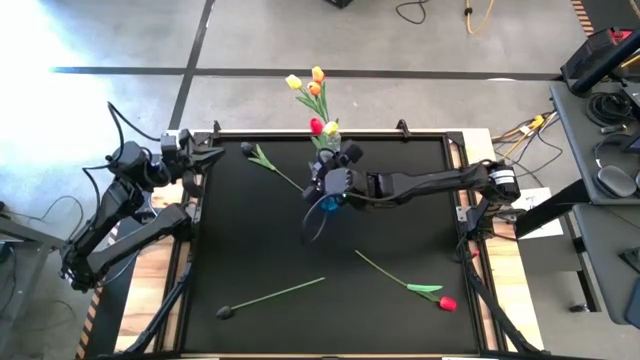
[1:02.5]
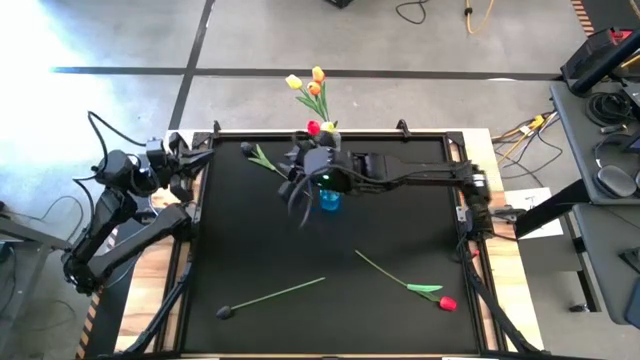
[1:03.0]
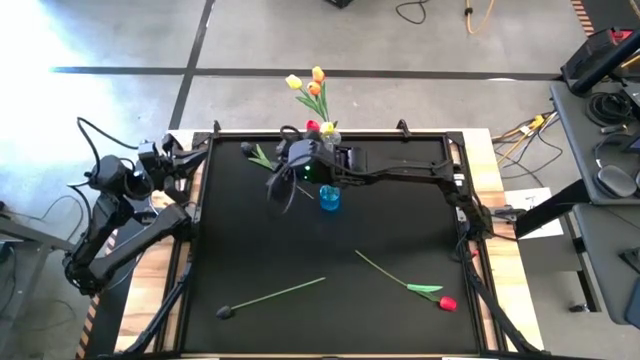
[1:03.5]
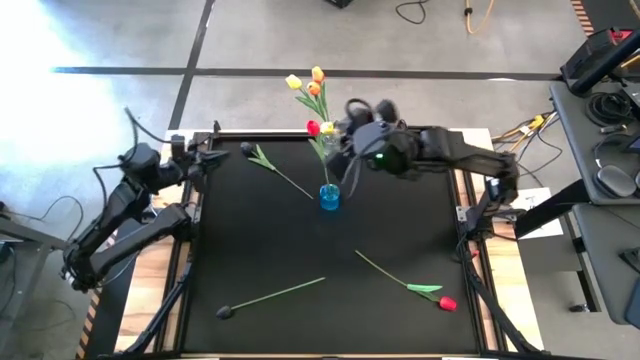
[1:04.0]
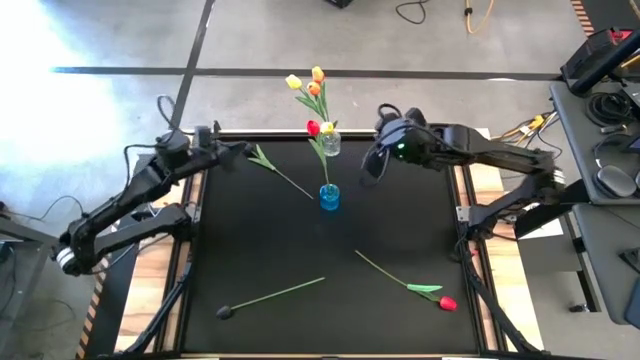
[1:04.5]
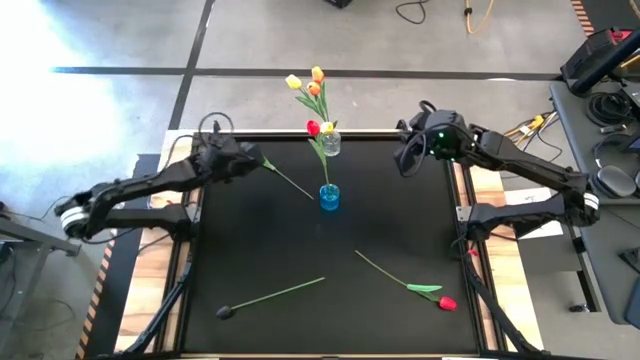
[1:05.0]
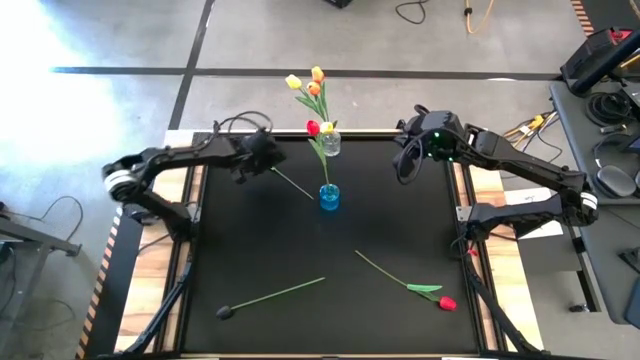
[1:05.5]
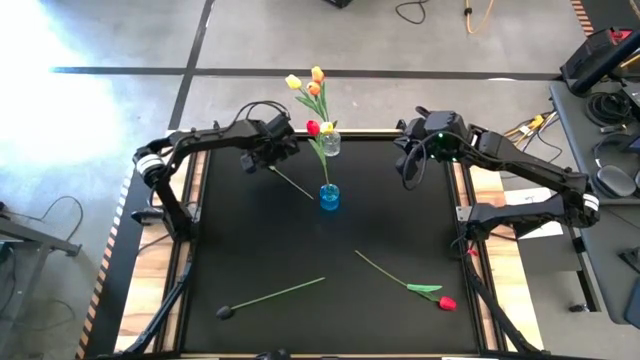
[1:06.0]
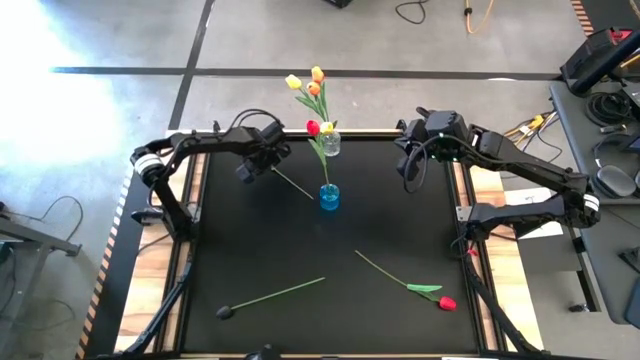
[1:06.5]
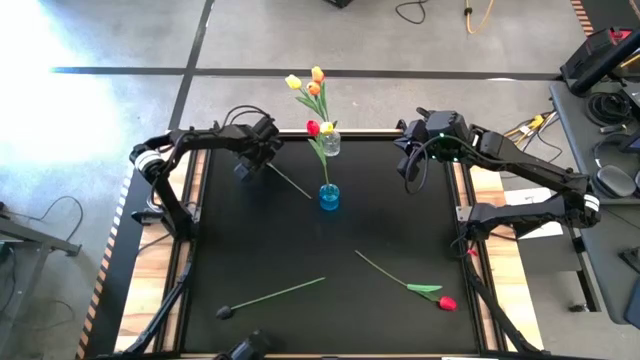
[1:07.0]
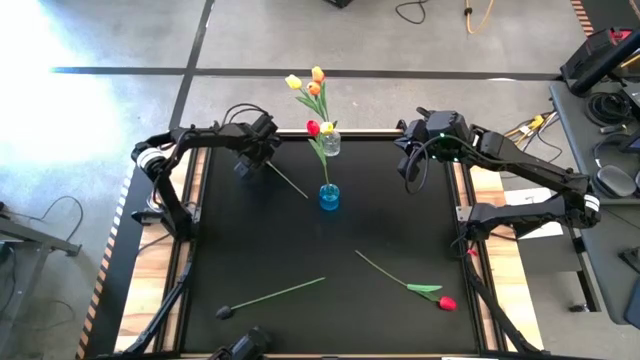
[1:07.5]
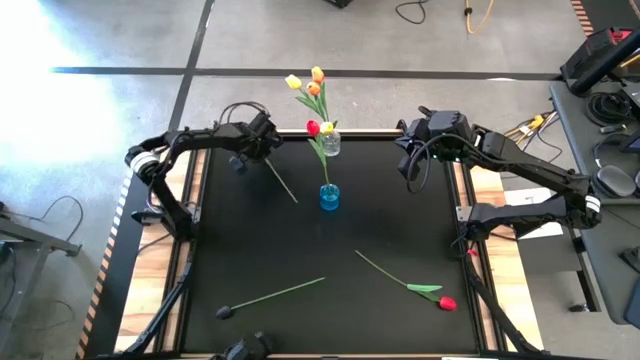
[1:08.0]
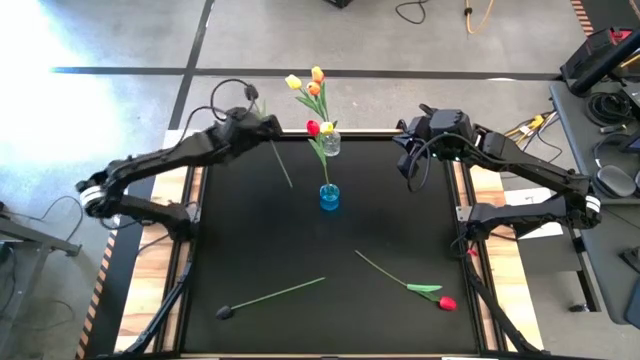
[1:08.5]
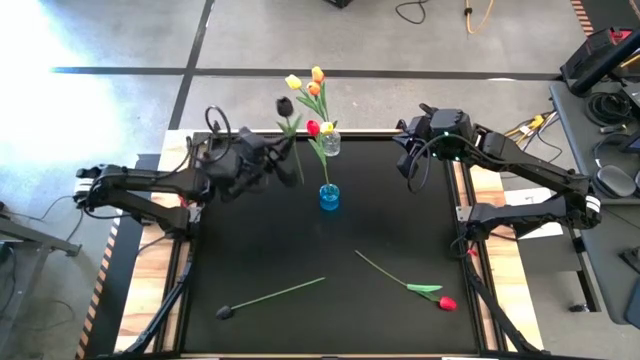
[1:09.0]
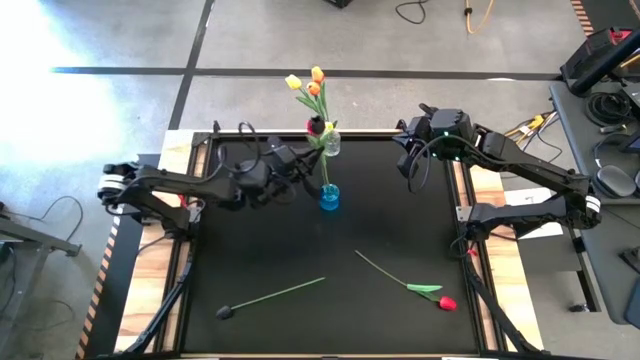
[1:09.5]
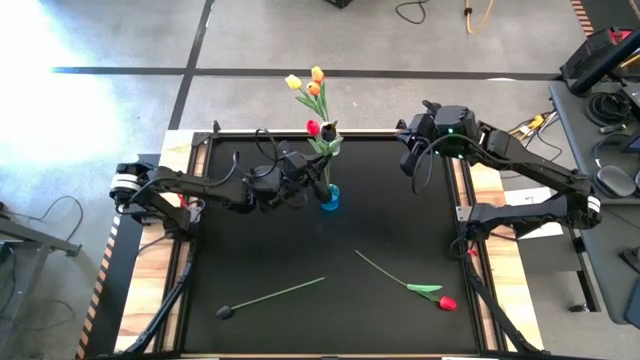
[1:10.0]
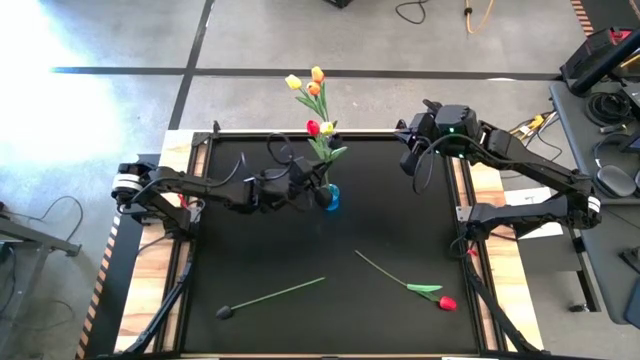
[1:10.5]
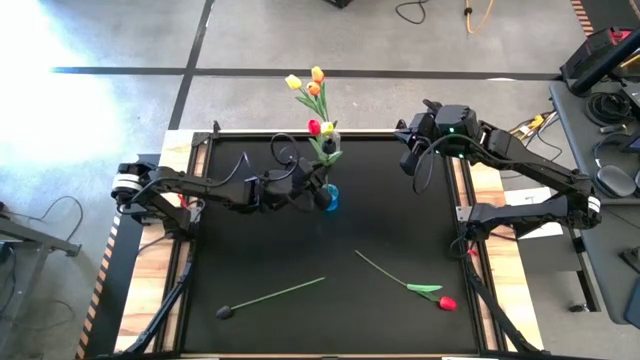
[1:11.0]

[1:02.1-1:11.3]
Task: Sort flowers into vase by color
Put the top black tulip flower into the blue vase

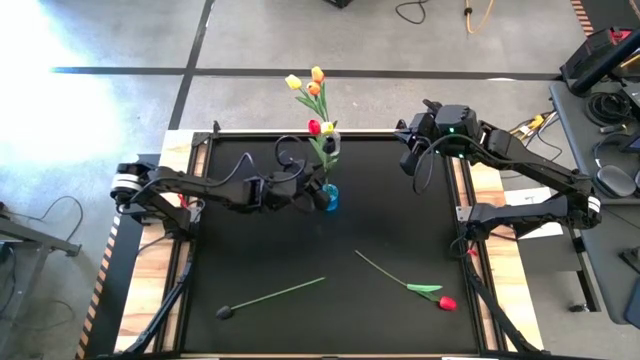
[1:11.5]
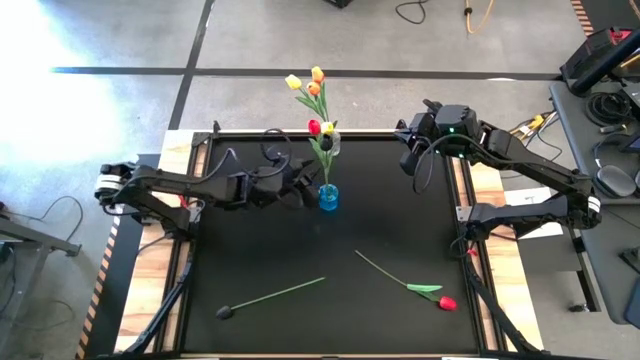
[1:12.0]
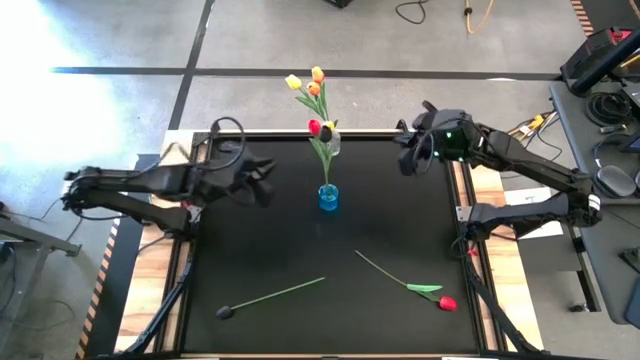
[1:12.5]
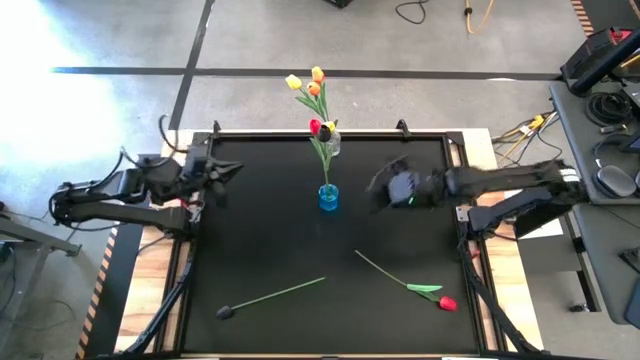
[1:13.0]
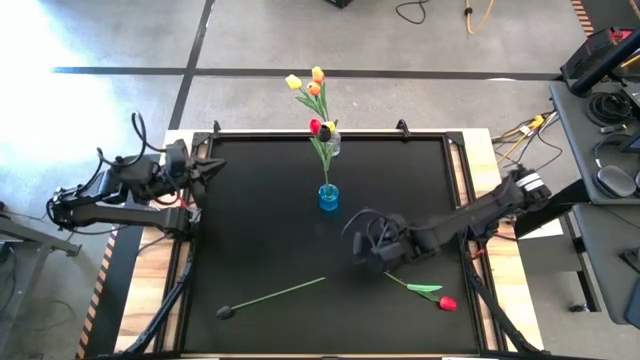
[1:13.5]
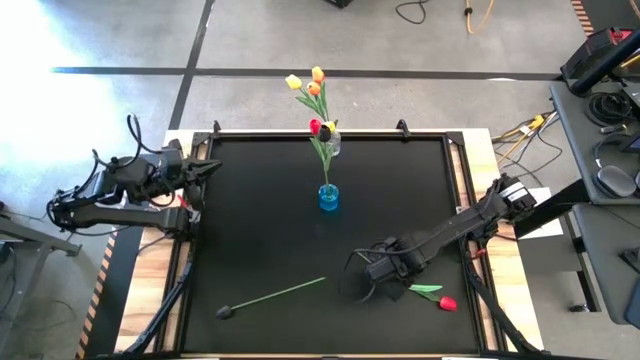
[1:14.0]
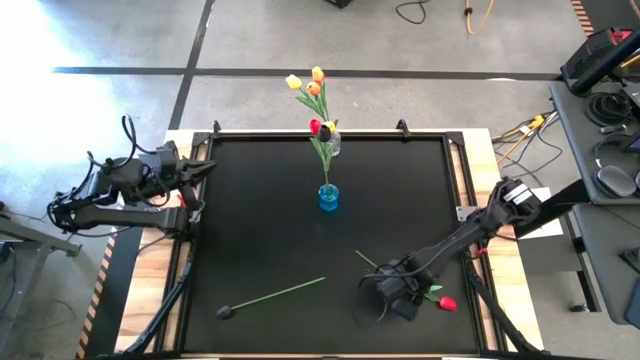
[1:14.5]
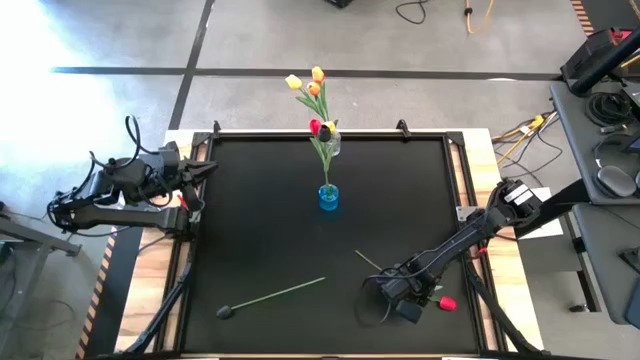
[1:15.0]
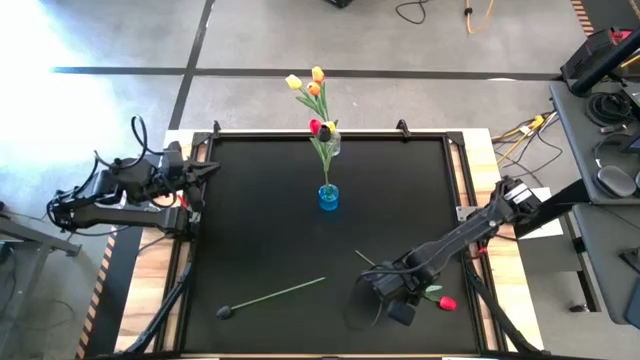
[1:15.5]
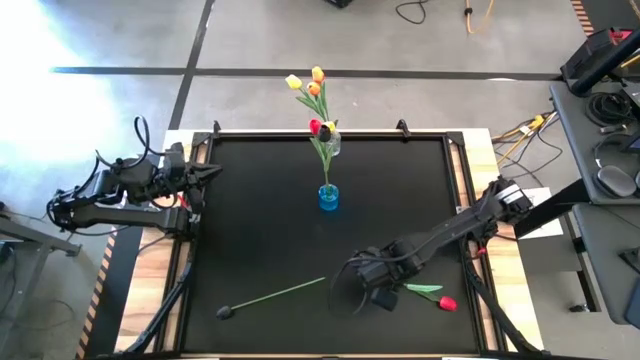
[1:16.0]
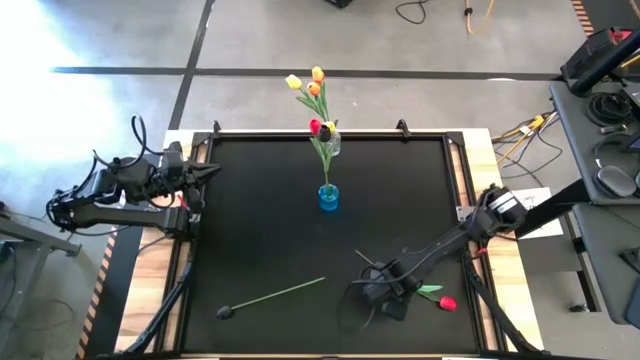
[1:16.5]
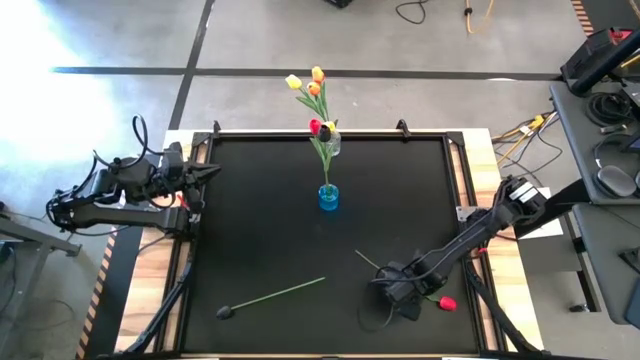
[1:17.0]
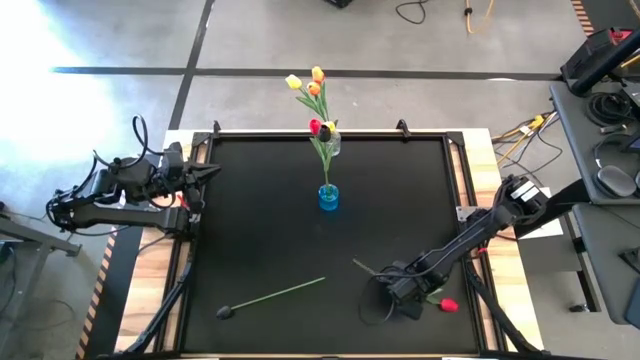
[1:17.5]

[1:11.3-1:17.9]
Put the red tulip flower into the blue vase

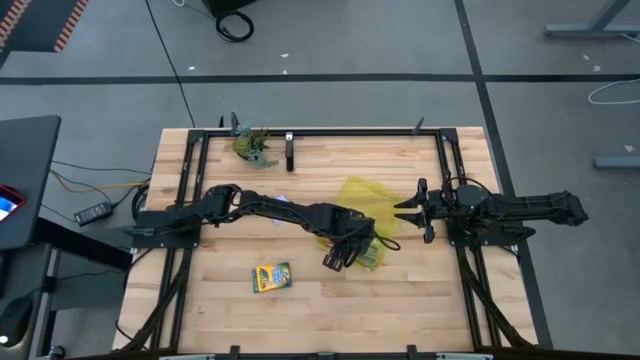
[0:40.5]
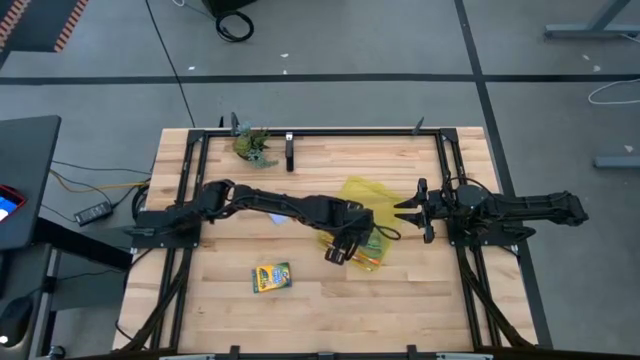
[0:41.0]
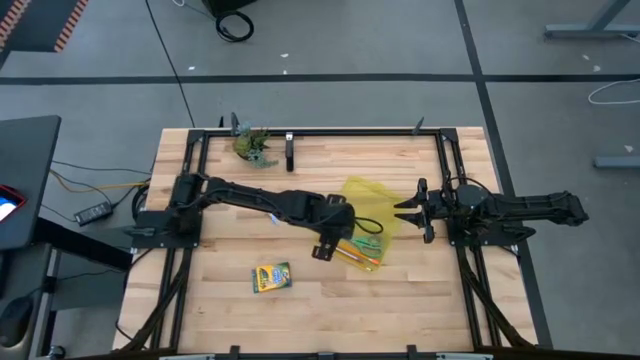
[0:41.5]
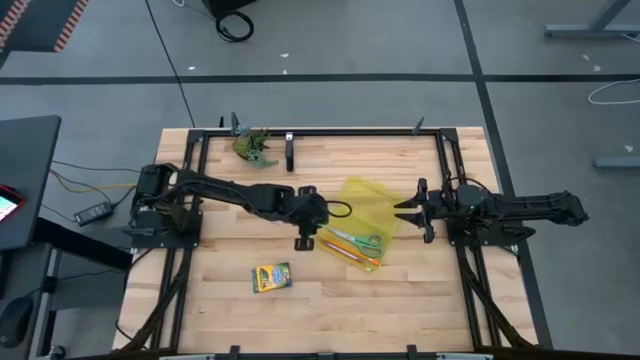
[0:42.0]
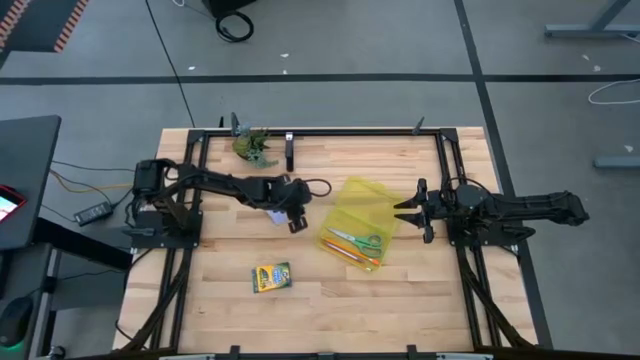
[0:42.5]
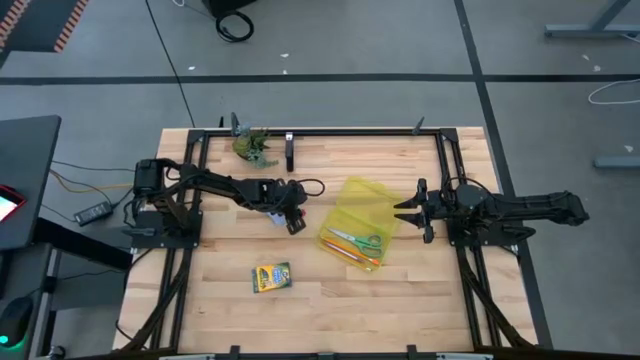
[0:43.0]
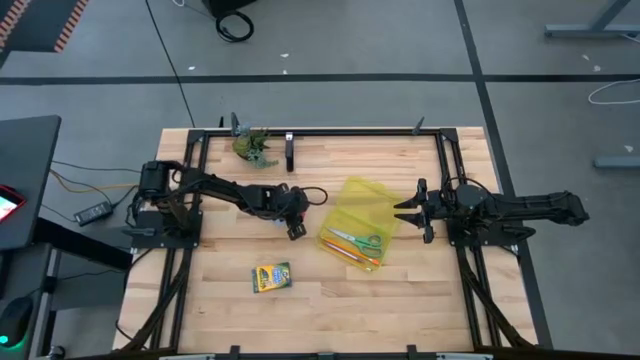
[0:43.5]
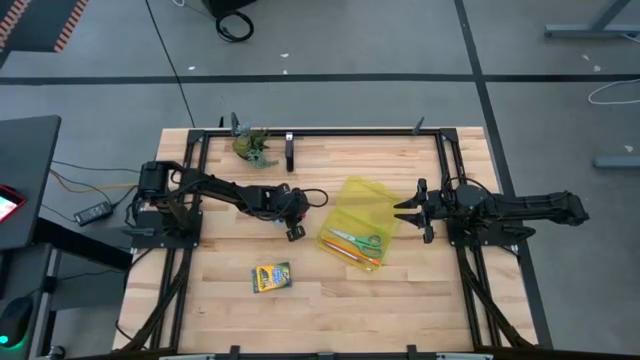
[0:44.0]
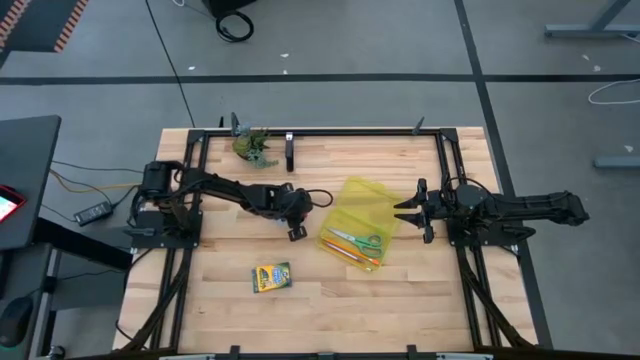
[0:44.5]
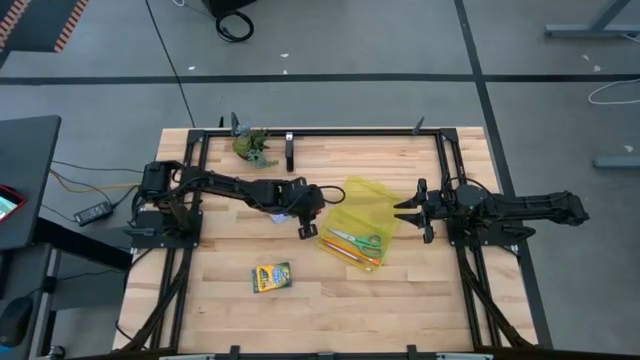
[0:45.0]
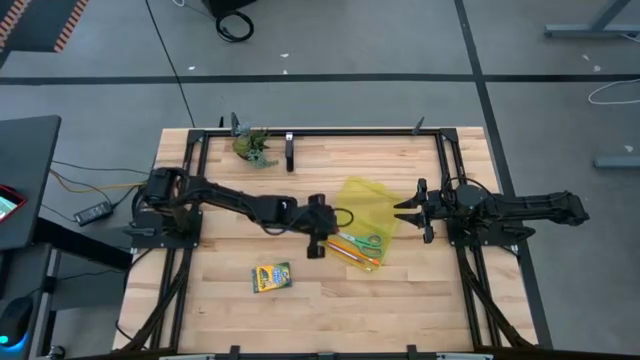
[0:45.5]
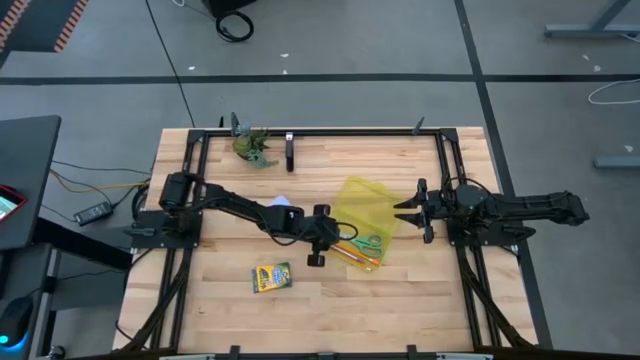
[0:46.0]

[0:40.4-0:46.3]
Task: Pack school essentials
Put the red eraser into the yellow supply box
